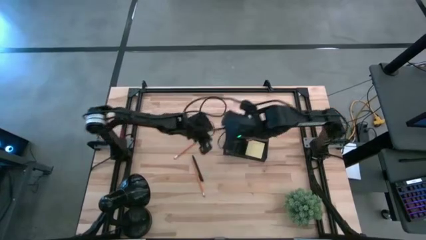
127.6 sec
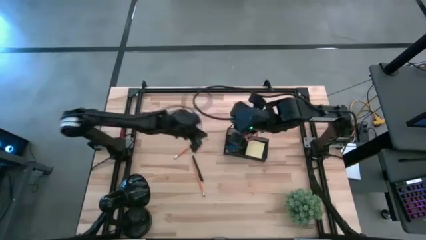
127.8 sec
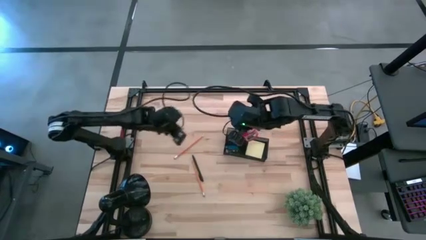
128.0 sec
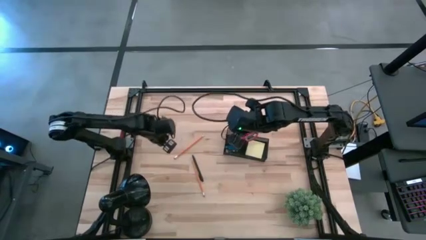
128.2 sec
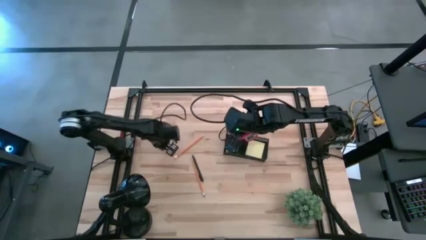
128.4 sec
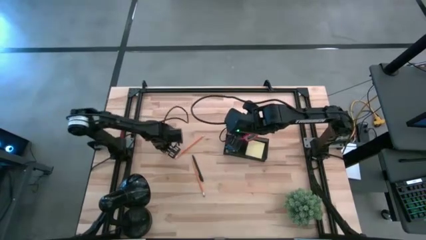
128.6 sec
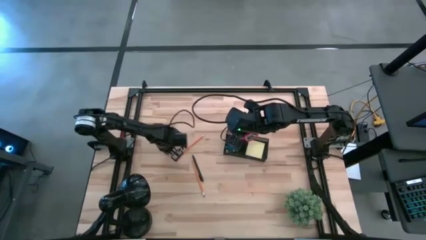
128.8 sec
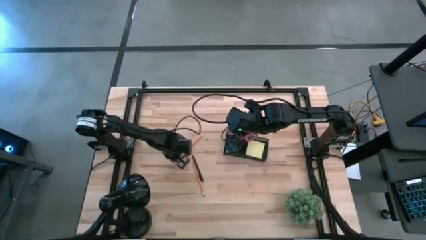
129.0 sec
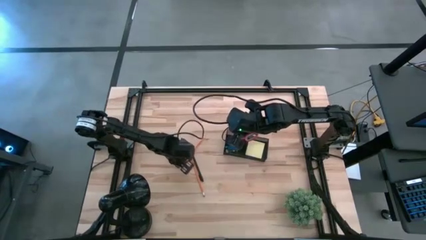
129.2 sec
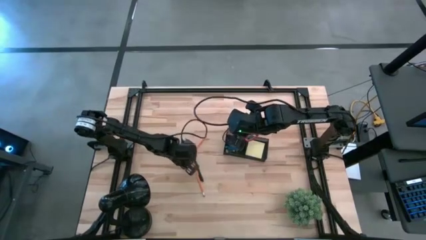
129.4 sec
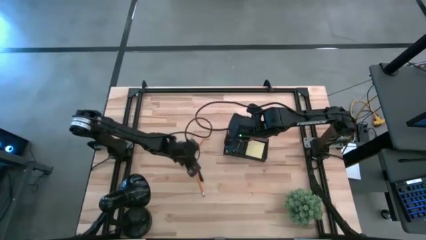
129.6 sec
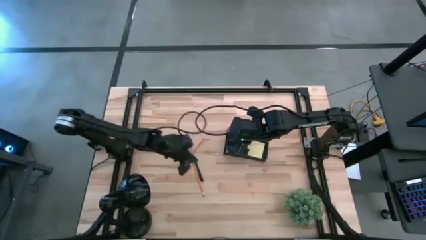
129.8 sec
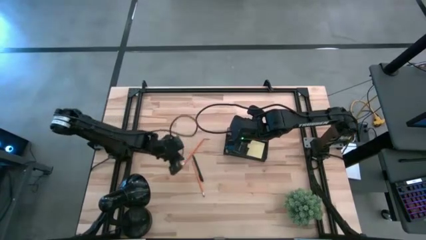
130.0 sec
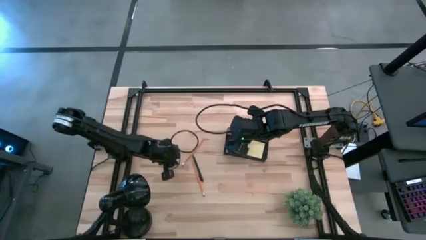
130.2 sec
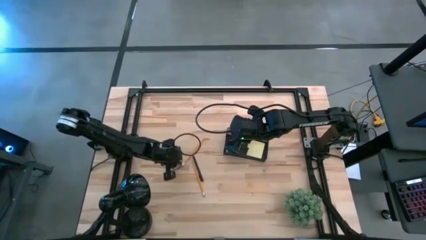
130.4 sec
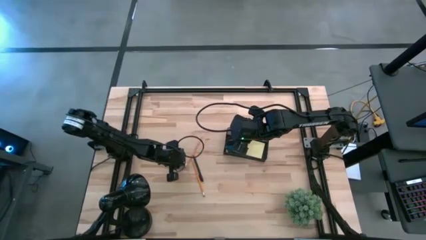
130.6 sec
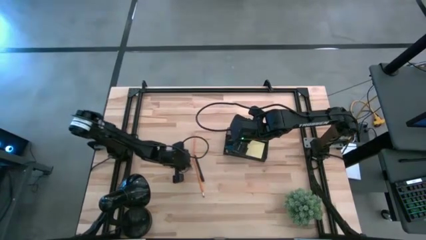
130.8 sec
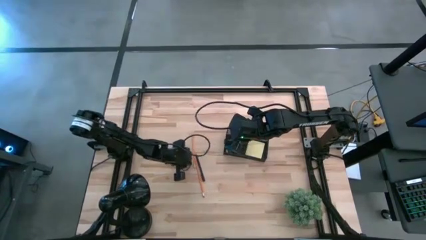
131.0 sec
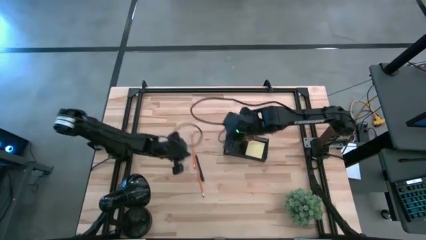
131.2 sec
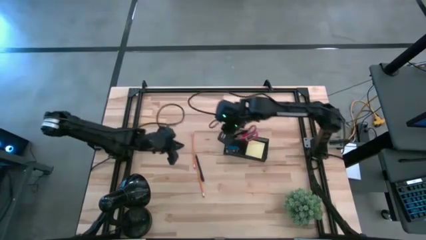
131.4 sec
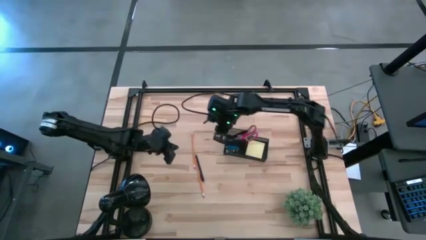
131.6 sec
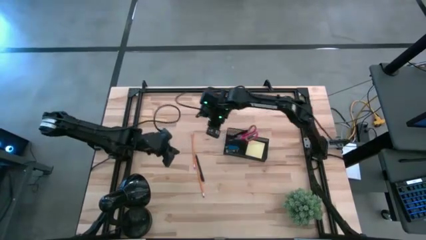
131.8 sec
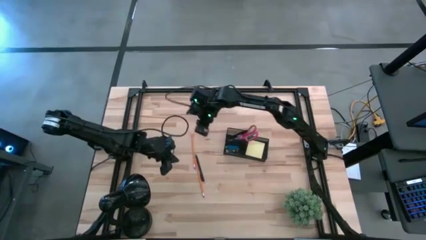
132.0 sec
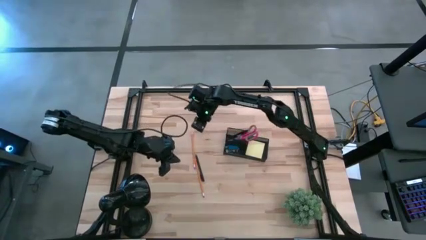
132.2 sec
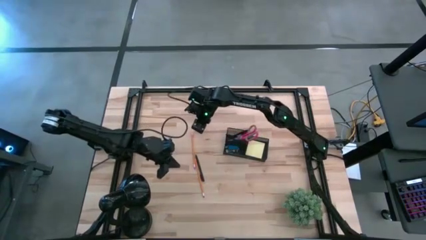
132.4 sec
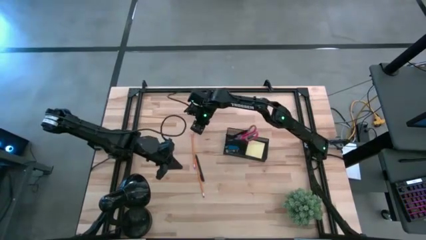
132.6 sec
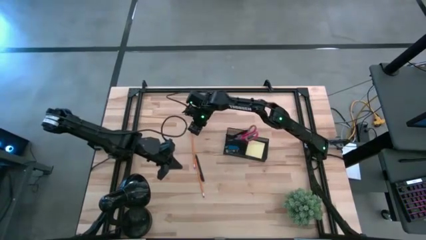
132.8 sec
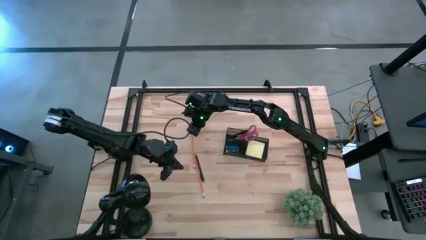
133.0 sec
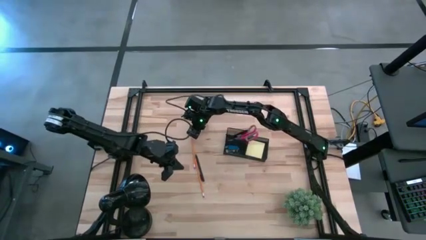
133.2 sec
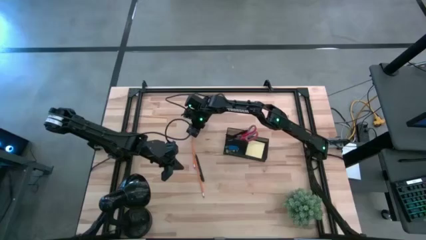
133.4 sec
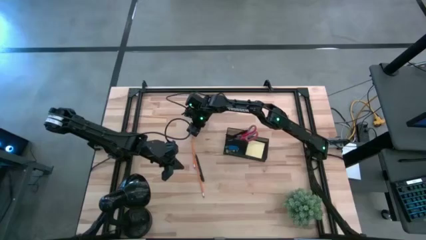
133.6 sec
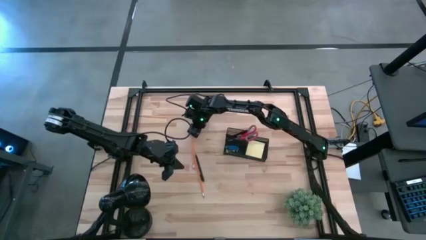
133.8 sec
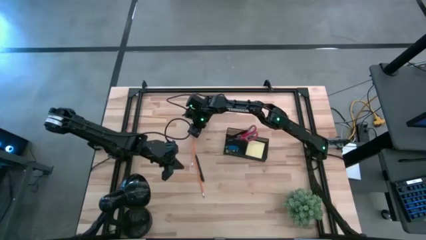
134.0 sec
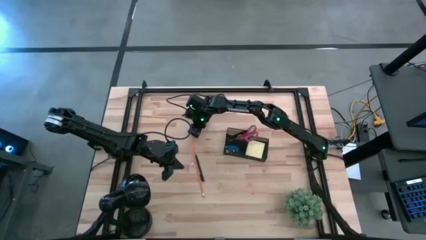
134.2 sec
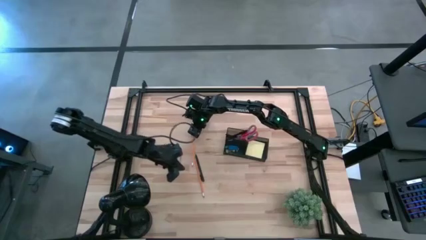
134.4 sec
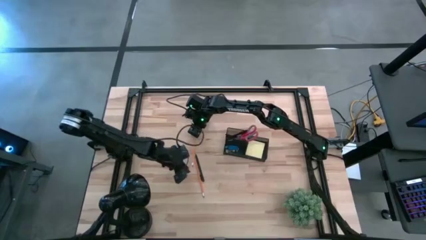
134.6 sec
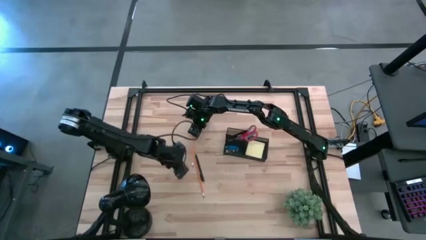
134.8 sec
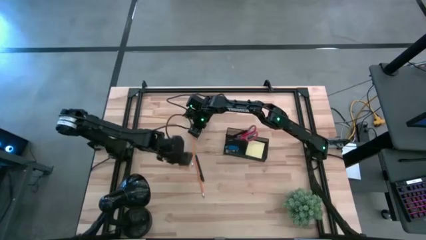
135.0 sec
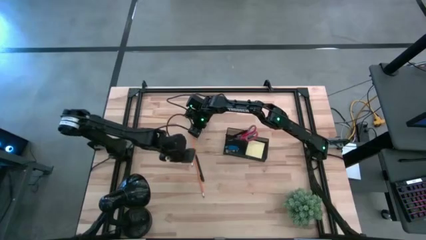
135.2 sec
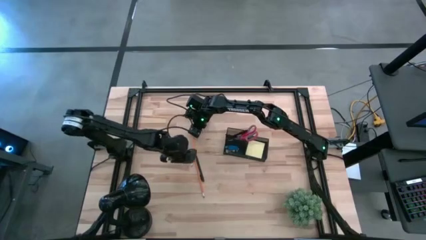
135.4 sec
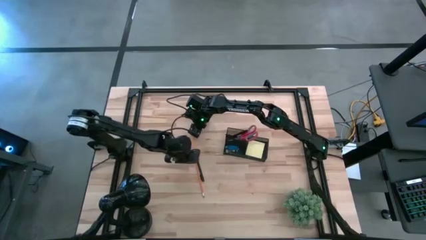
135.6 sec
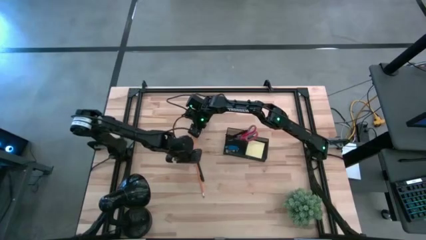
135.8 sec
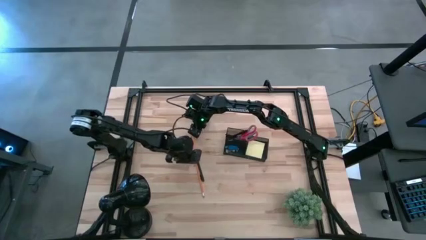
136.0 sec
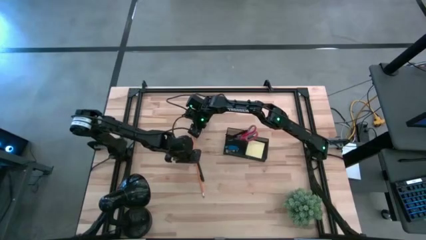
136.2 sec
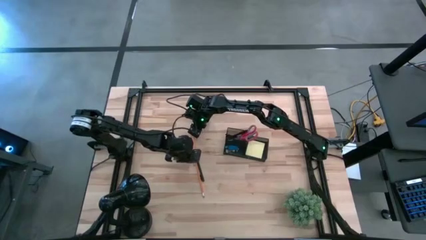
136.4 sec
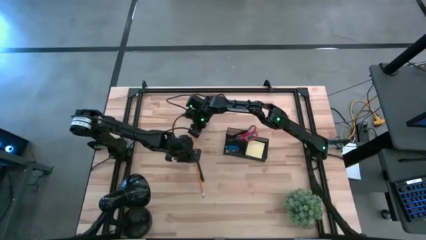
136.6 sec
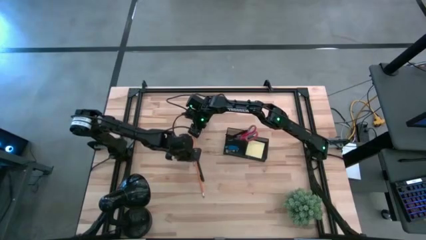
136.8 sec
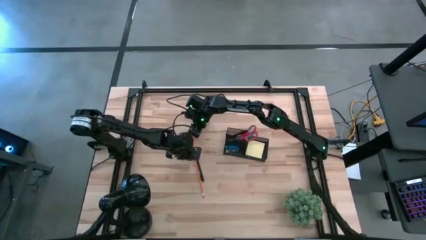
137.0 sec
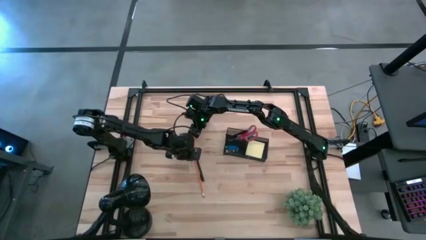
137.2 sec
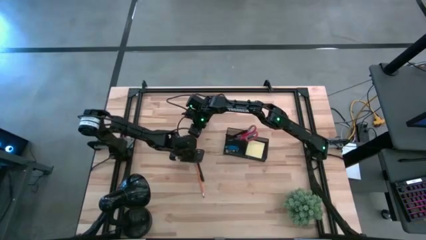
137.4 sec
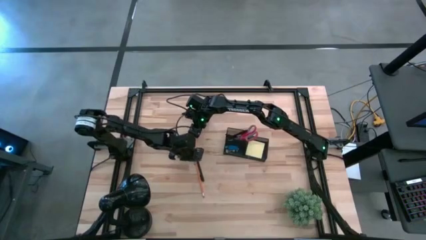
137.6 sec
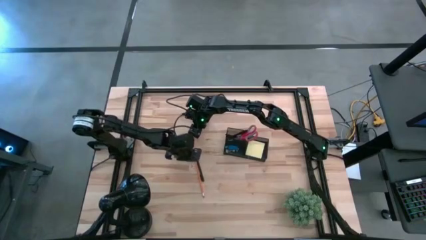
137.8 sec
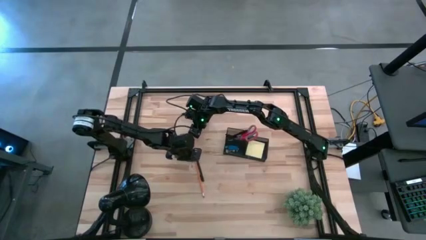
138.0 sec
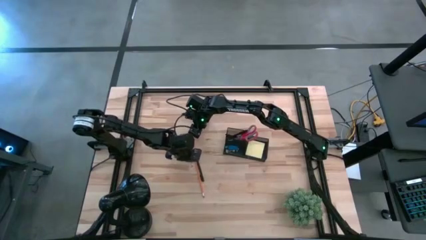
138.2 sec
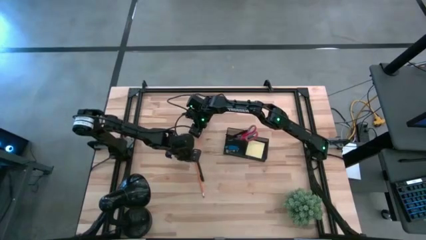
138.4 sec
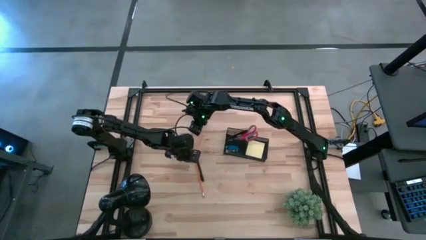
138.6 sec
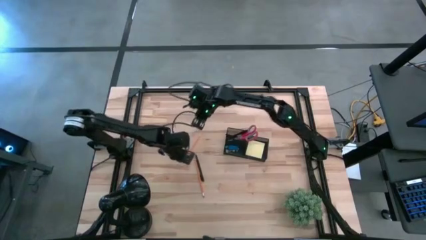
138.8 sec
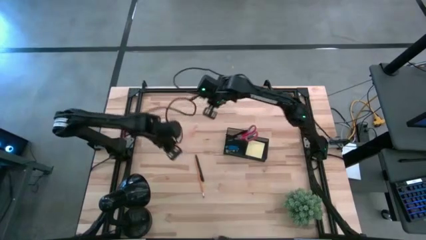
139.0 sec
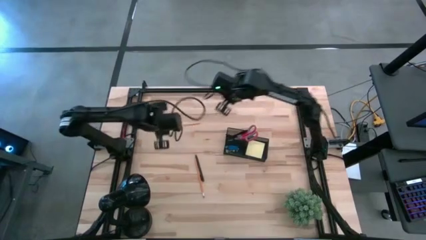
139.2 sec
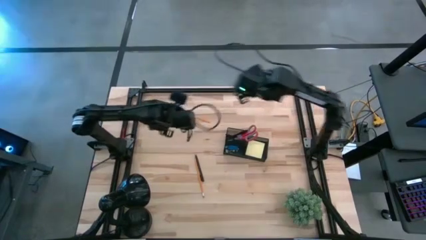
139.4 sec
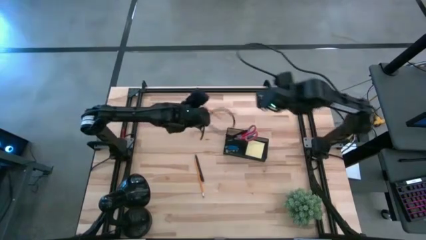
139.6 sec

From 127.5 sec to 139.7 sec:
Task: Pick and place office supplies into organizer
Put the top pencil into the desk organizer
